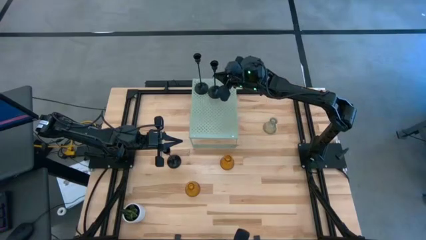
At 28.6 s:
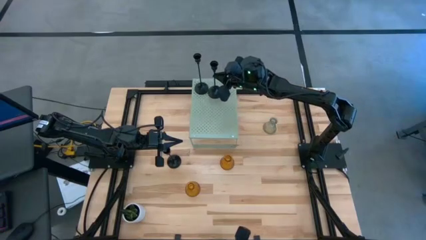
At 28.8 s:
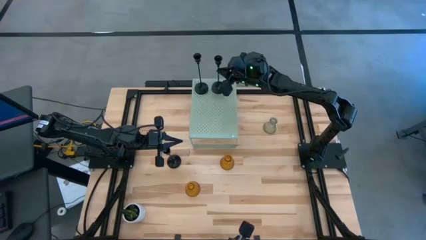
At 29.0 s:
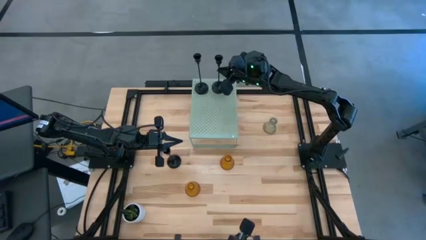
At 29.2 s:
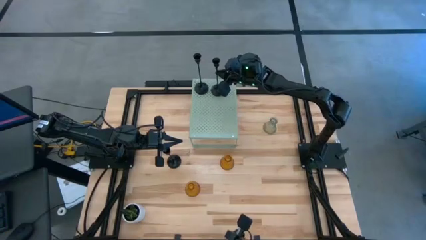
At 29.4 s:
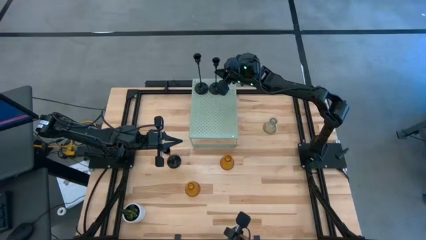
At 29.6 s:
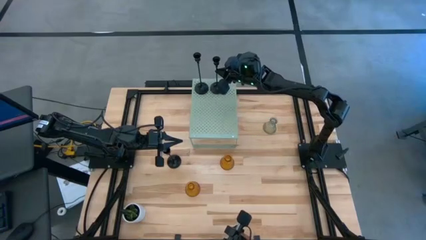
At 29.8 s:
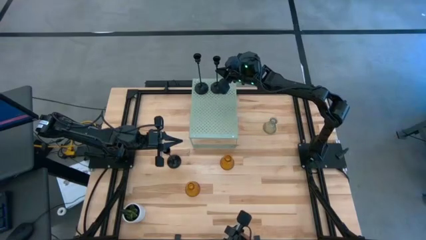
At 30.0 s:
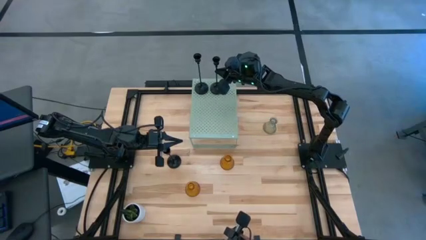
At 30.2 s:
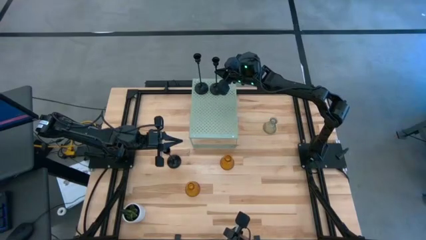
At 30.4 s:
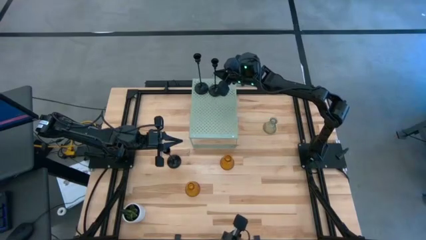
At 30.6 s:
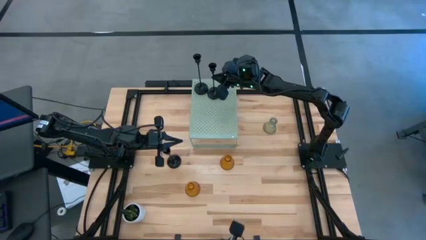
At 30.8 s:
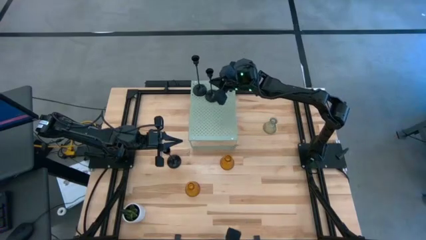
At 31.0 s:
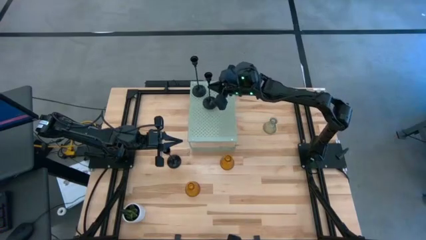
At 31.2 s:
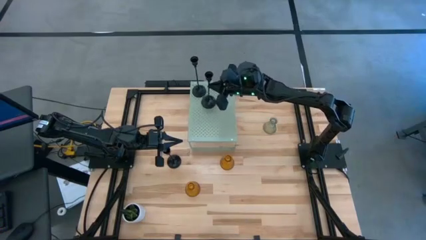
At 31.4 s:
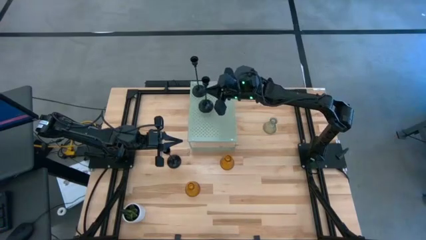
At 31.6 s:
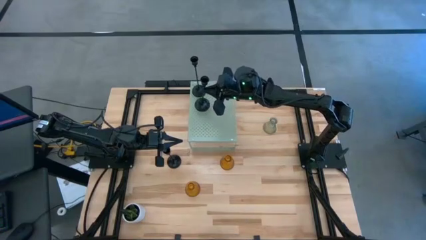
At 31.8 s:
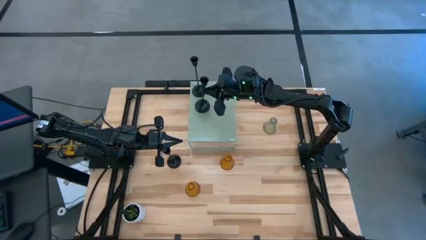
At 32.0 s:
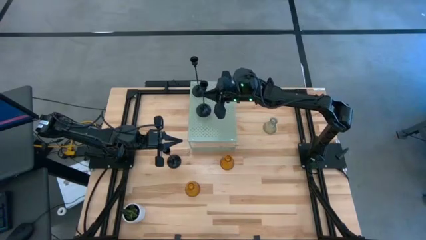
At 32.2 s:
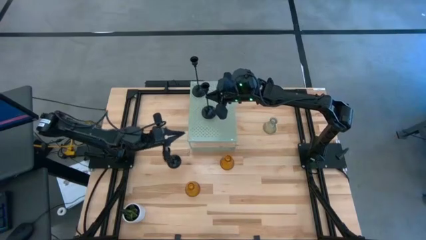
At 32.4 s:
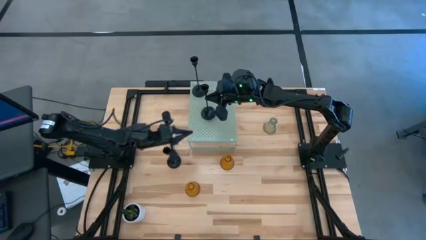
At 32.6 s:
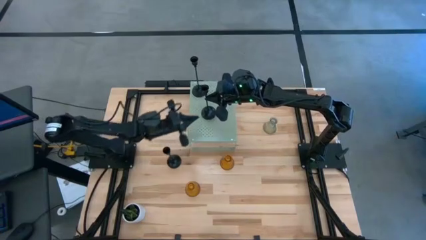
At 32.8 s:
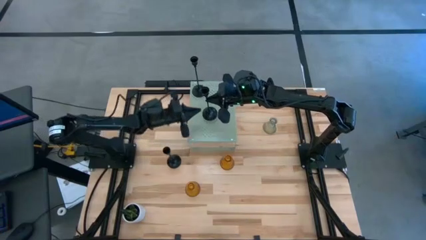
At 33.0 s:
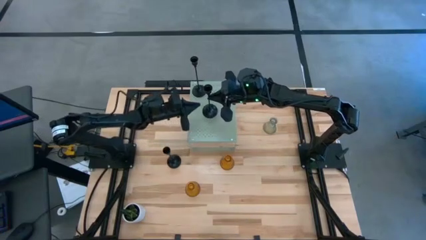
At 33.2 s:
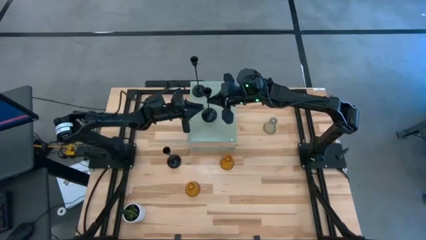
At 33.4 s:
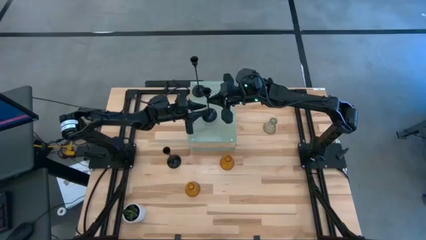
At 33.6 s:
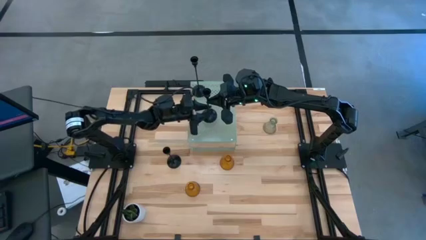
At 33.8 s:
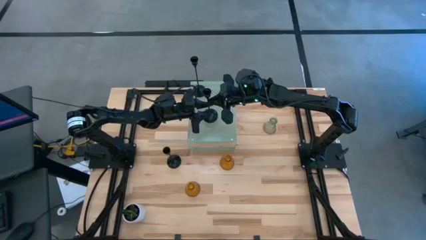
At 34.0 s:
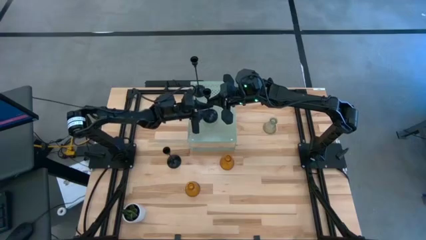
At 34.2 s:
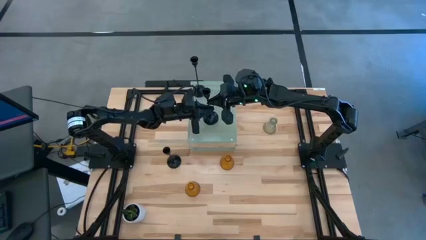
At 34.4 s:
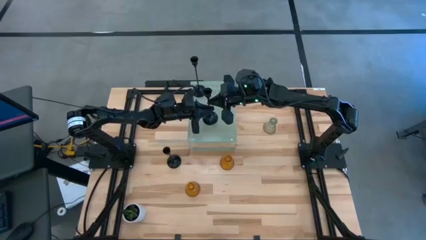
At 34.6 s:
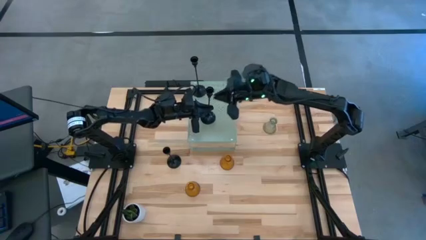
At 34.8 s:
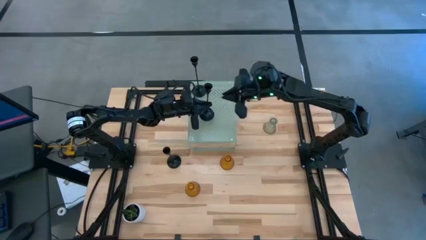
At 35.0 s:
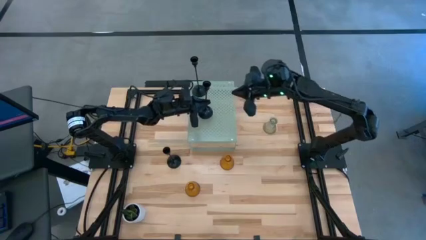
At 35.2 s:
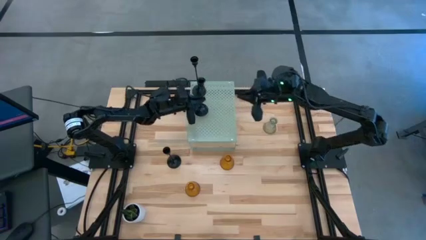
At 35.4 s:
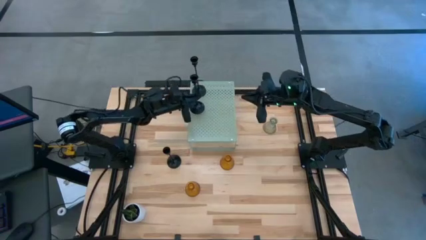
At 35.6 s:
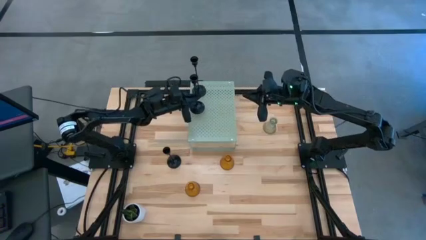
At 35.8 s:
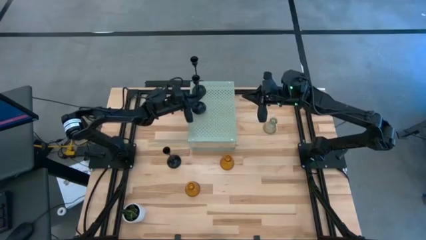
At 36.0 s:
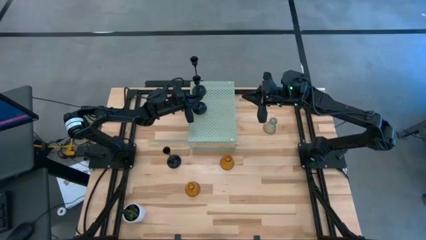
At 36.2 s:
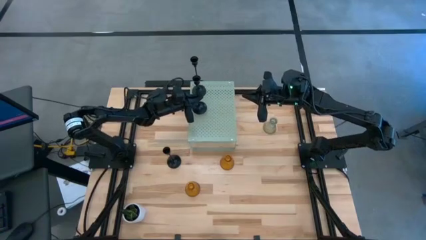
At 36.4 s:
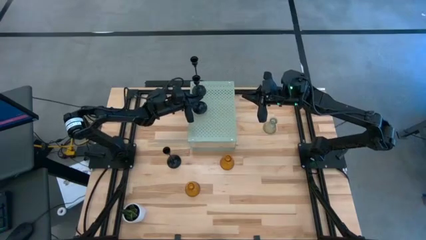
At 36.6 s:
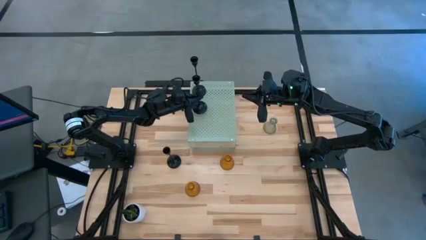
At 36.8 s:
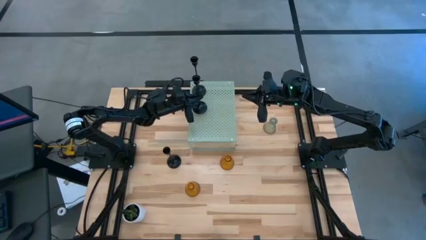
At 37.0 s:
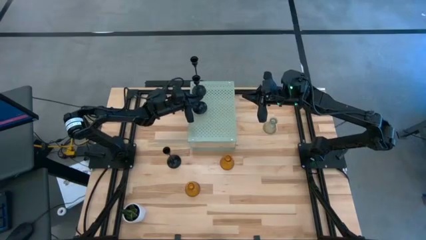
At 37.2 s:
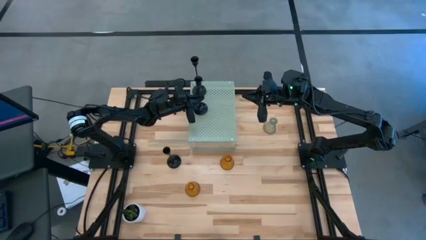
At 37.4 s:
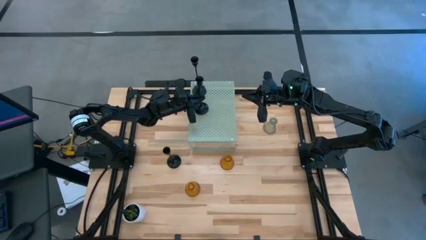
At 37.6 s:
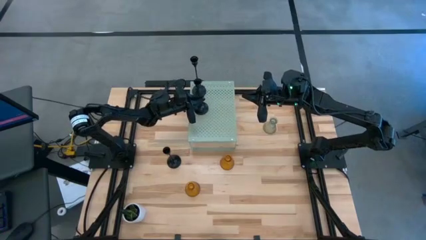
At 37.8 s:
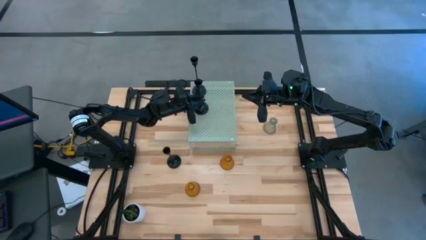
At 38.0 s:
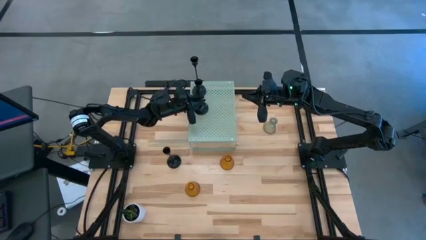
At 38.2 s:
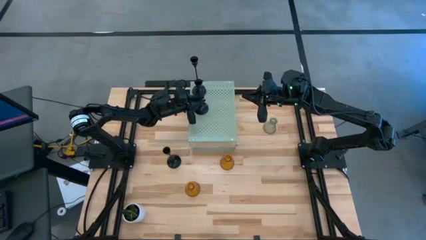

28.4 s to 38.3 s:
Task: Pick & Place candle stick holders
Put the top black candle holder on the shelf aligned with the other black candle holder

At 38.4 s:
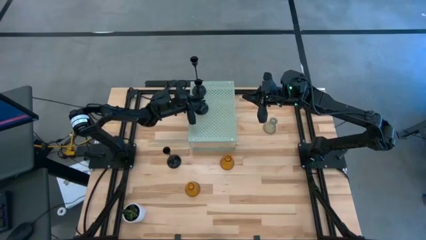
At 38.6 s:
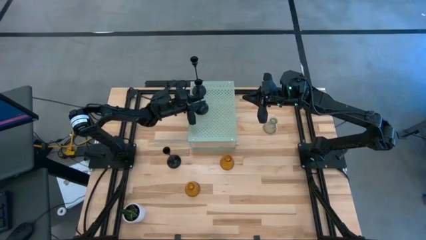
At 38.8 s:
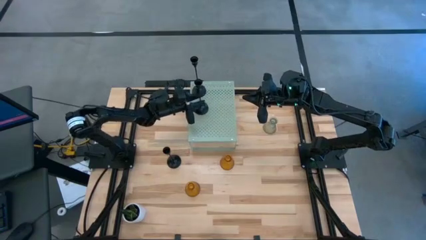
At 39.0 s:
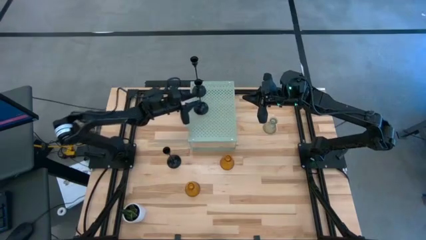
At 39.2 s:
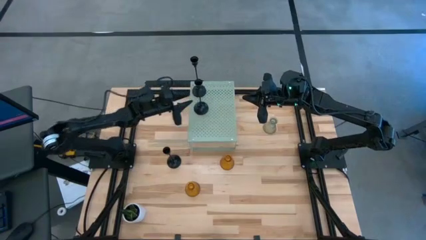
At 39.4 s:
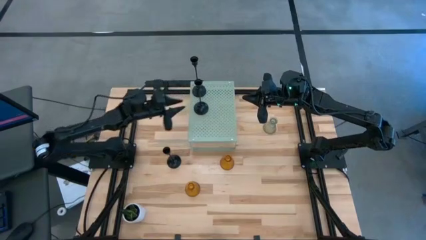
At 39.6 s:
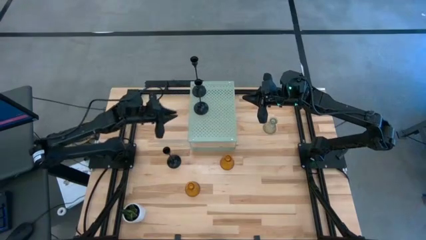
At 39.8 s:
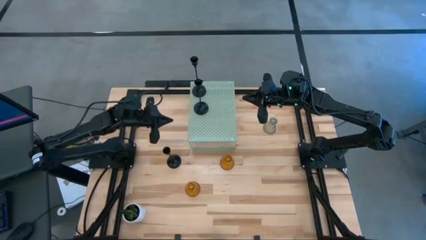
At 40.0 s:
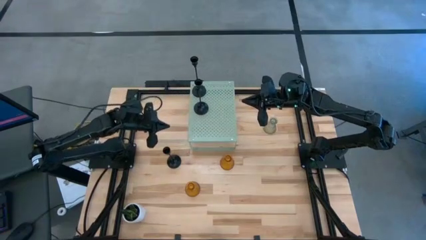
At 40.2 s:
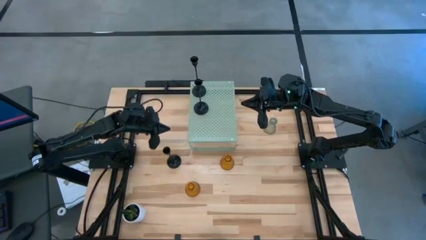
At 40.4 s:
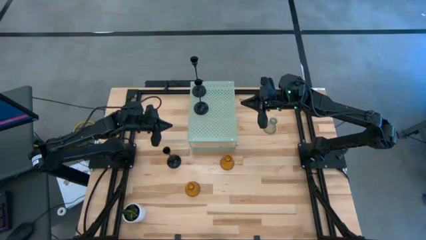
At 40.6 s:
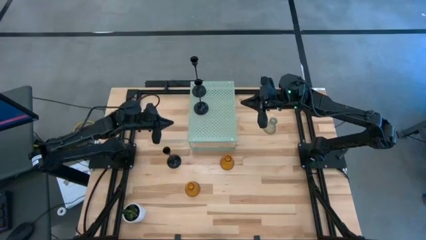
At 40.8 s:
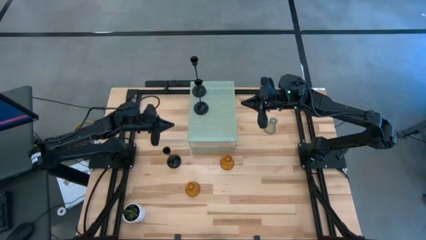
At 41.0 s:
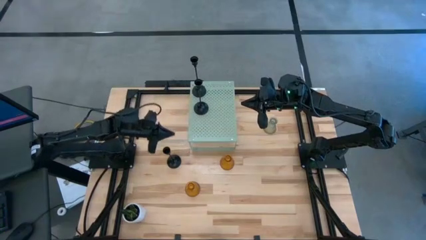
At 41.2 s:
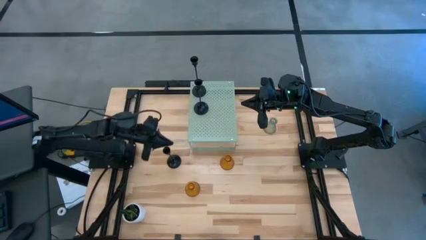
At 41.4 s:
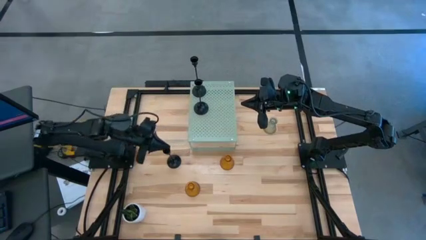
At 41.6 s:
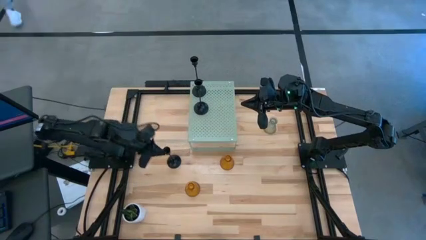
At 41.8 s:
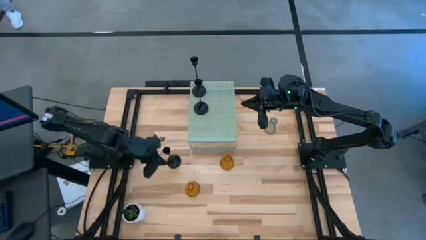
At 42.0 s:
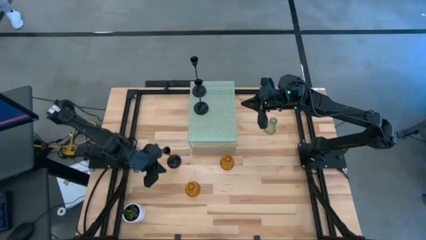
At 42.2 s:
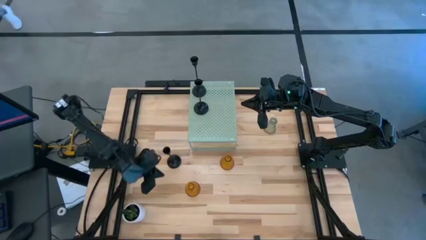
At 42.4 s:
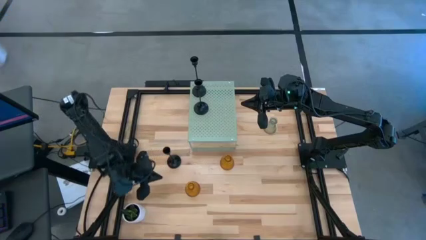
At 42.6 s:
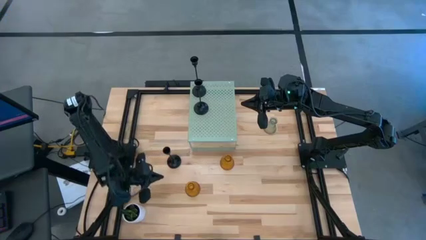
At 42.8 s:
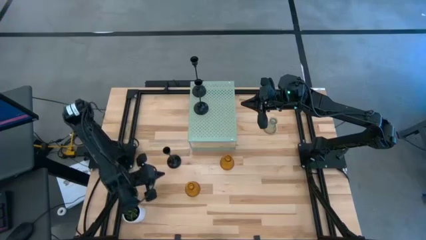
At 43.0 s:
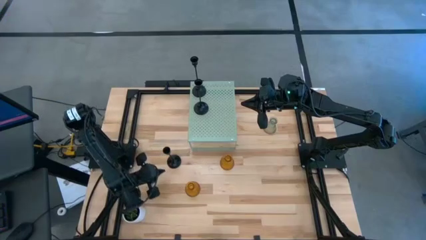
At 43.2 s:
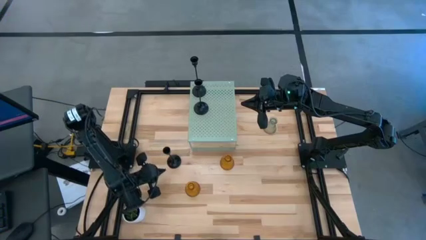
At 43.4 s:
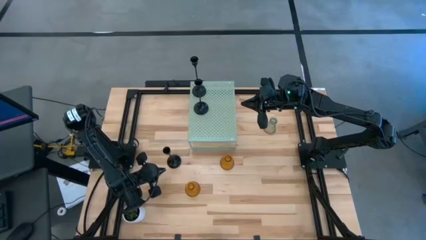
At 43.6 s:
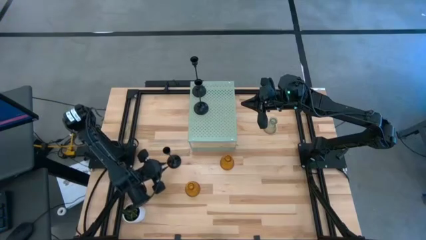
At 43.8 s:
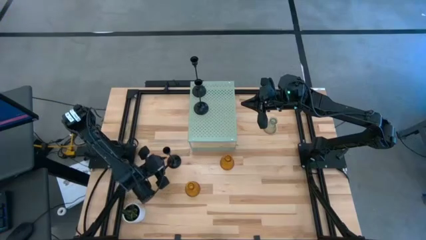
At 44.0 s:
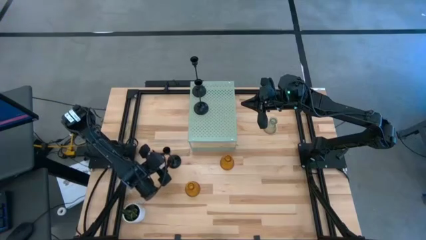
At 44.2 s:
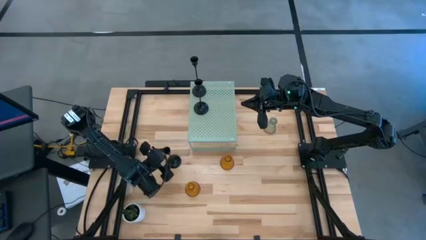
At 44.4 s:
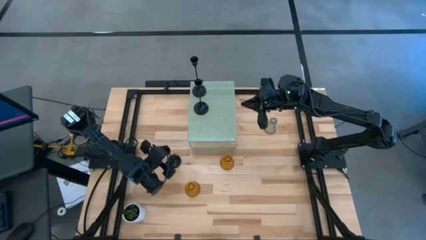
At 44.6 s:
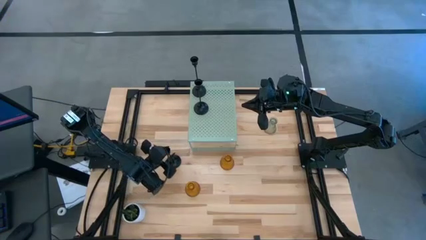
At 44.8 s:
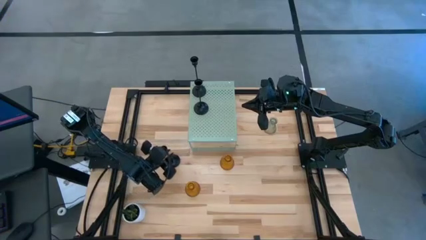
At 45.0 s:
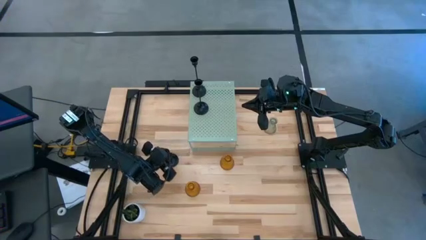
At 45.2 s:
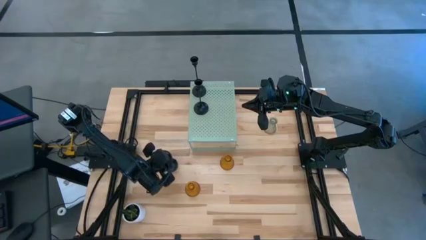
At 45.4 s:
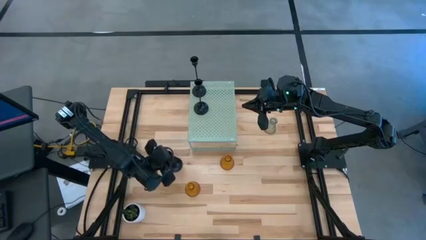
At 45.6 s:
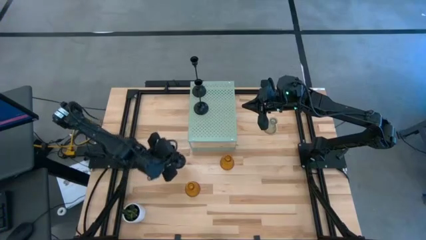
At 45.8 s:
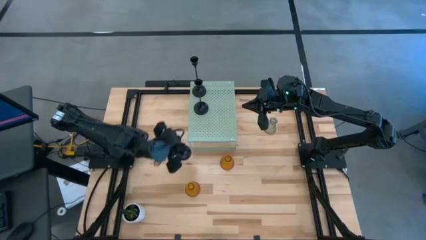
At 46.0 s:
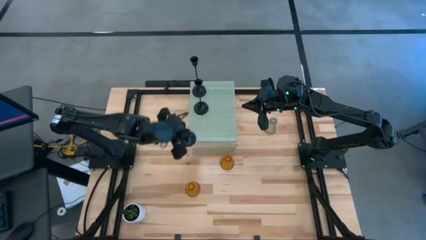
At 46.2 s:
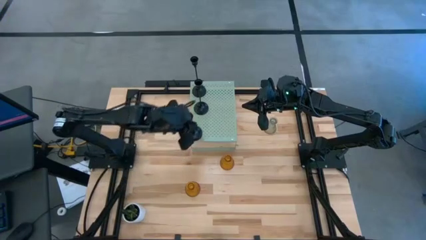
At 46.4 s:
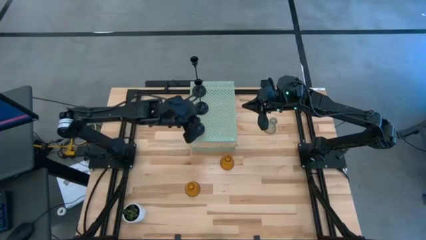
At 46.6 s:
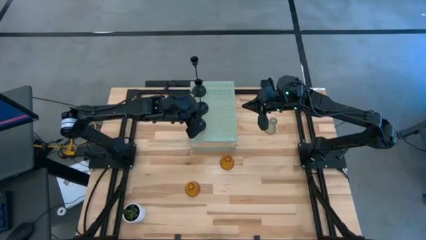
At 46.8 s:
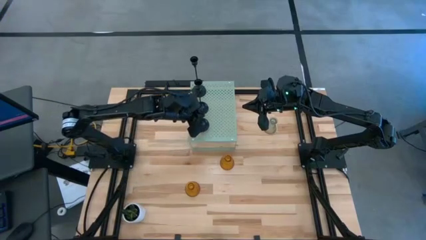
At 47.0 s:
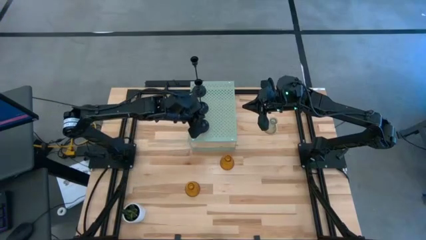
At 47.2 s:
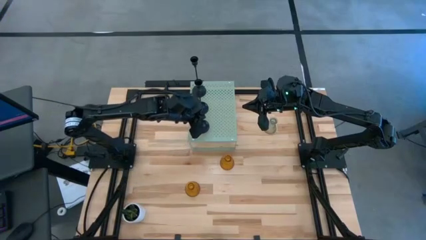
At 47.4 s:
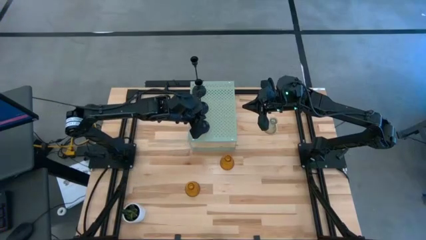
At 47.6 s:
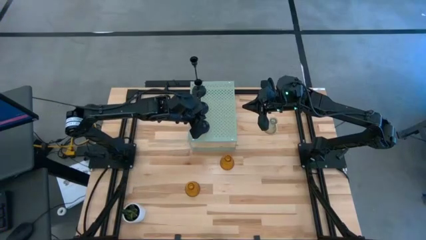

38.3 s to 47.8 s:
Put the black candle holder on the shelf aligned with the other black candle holder
